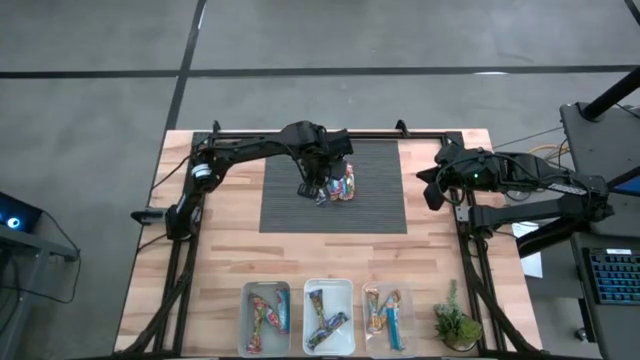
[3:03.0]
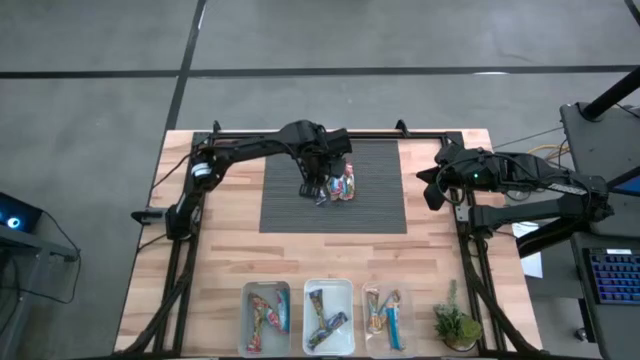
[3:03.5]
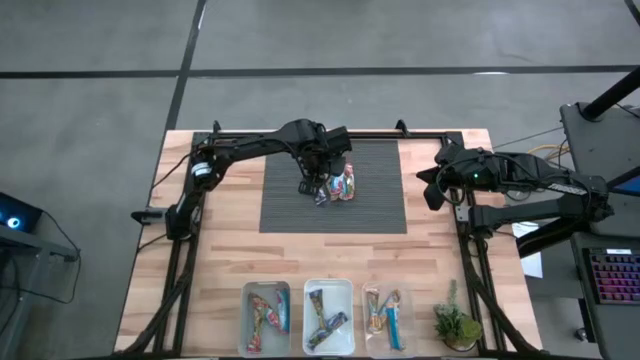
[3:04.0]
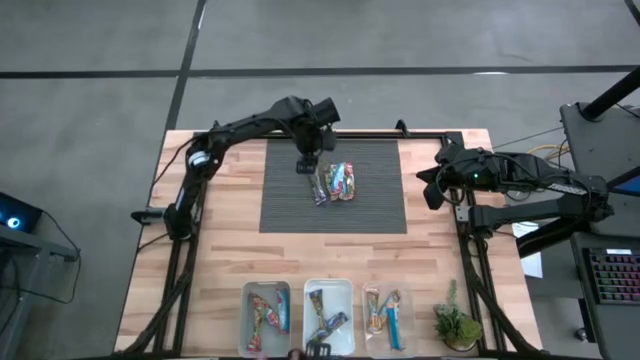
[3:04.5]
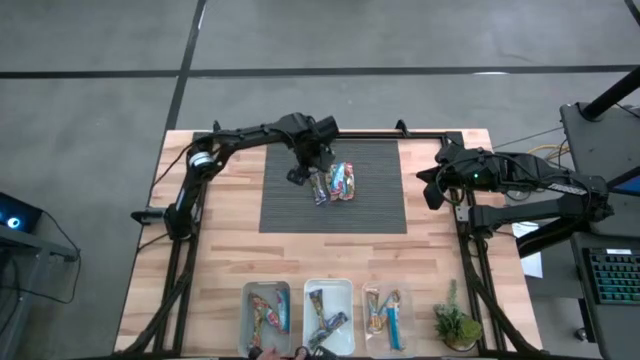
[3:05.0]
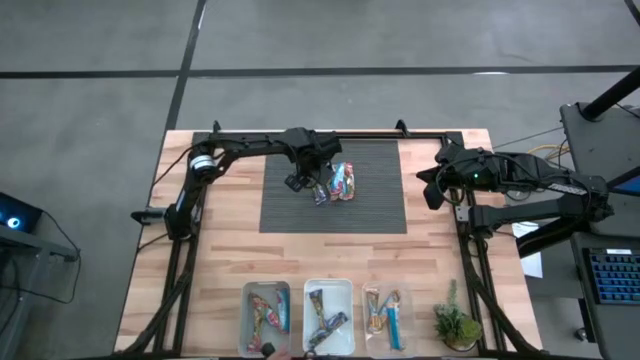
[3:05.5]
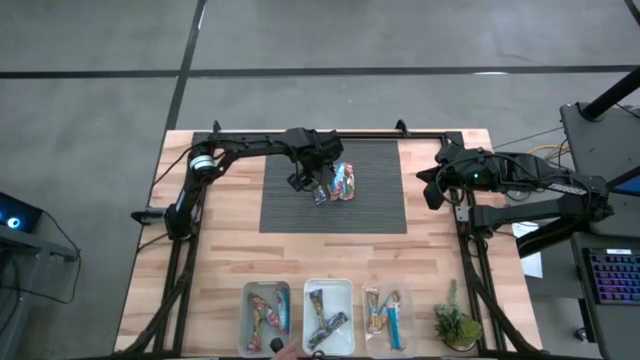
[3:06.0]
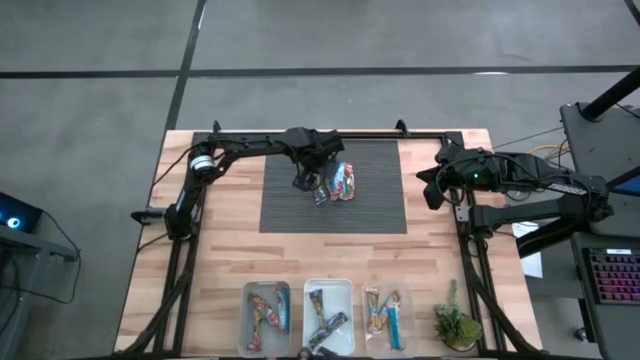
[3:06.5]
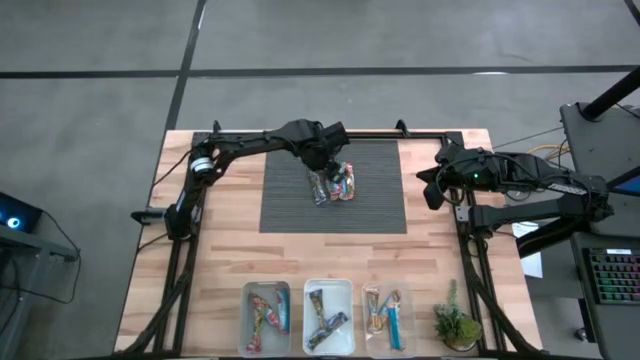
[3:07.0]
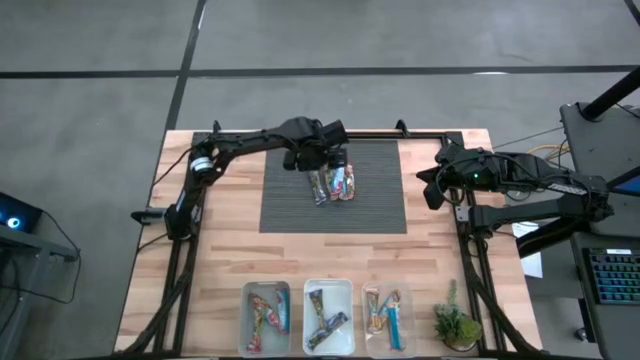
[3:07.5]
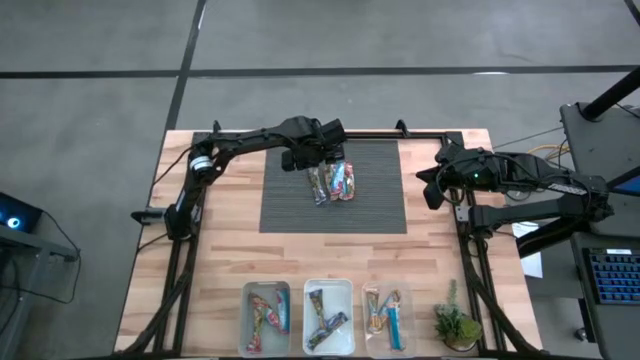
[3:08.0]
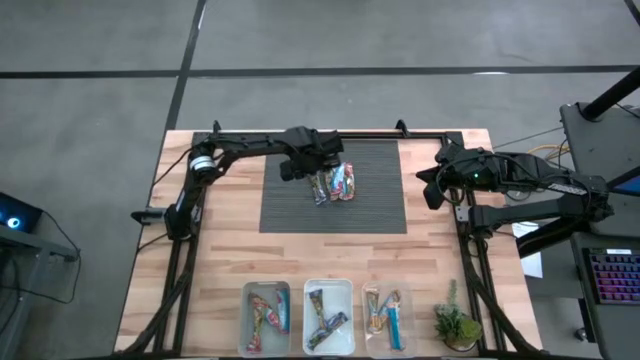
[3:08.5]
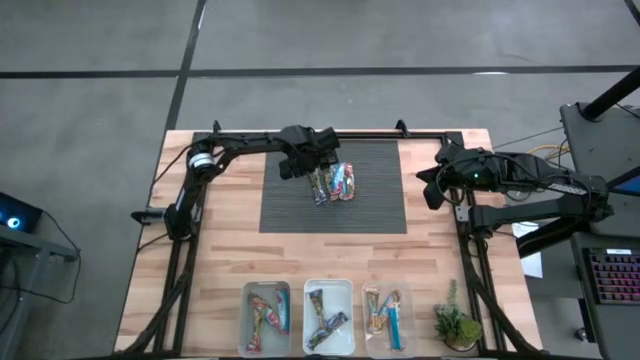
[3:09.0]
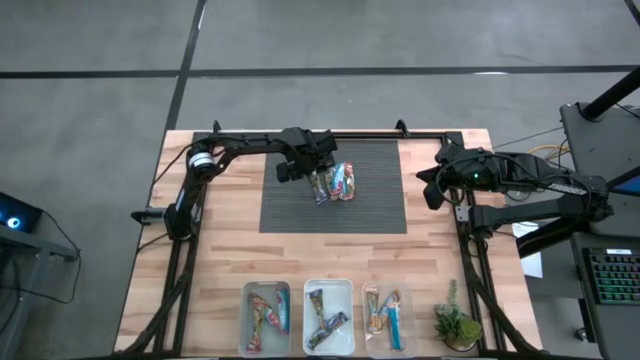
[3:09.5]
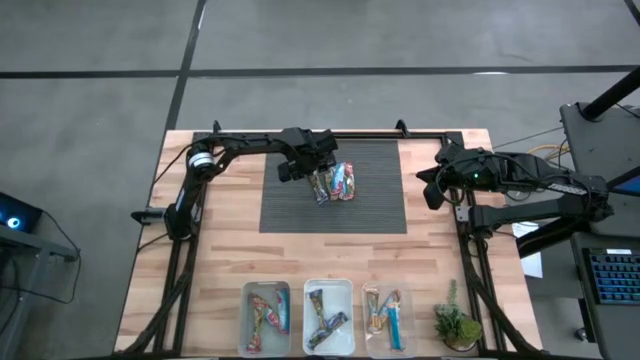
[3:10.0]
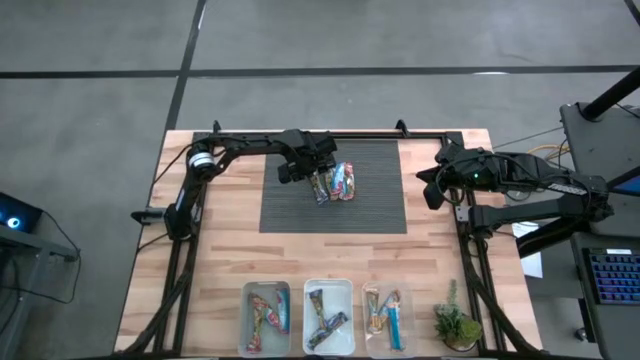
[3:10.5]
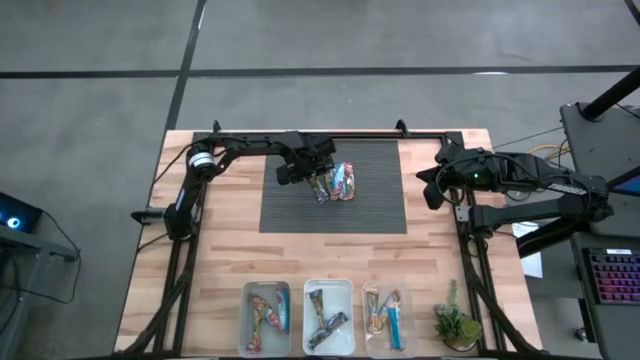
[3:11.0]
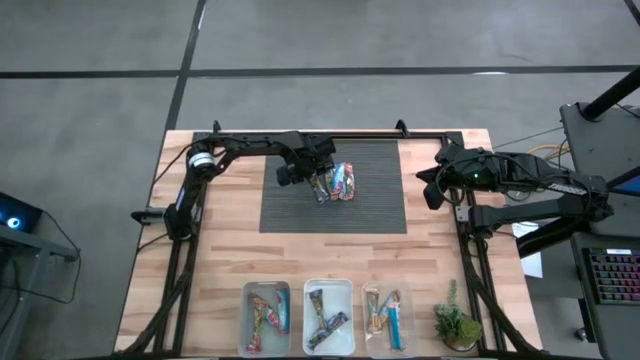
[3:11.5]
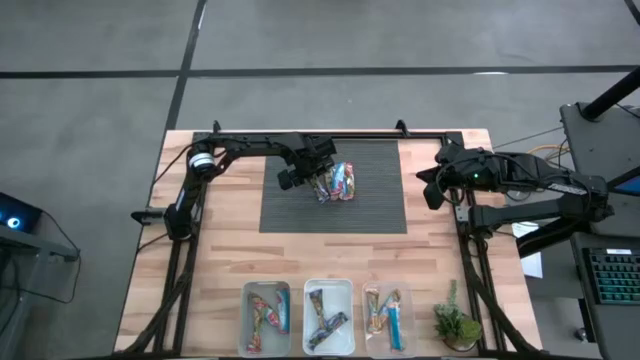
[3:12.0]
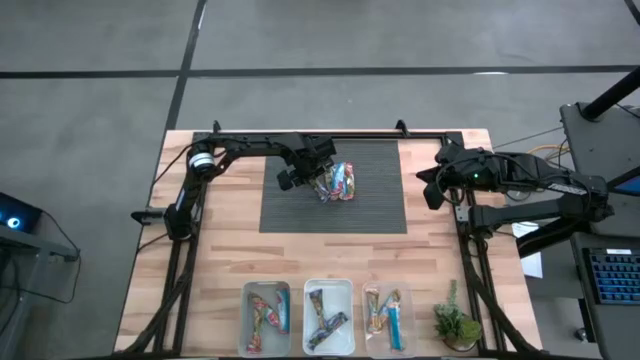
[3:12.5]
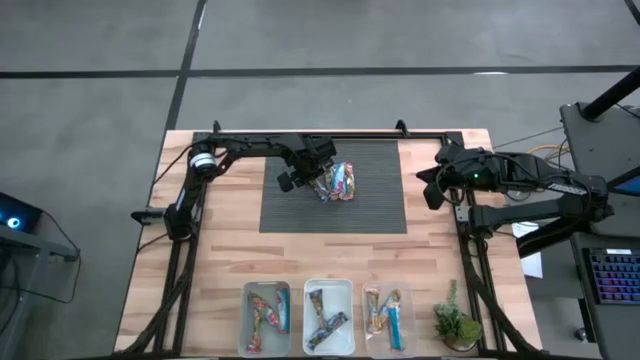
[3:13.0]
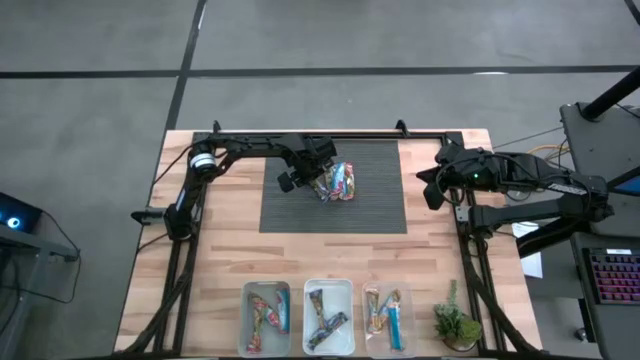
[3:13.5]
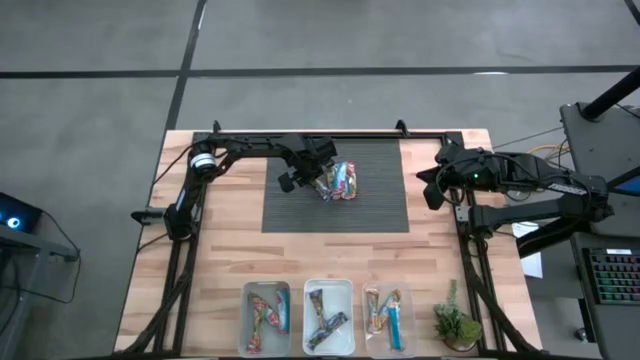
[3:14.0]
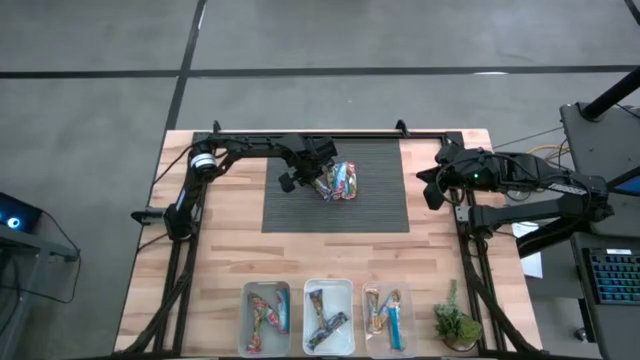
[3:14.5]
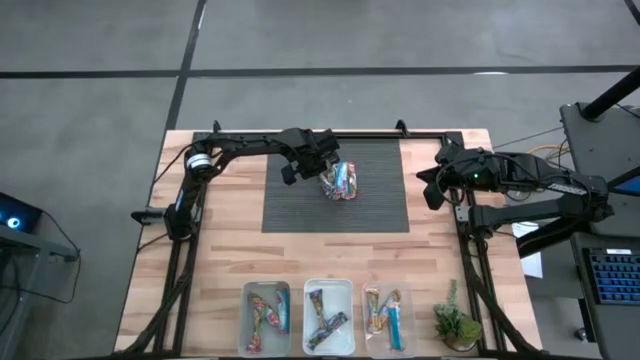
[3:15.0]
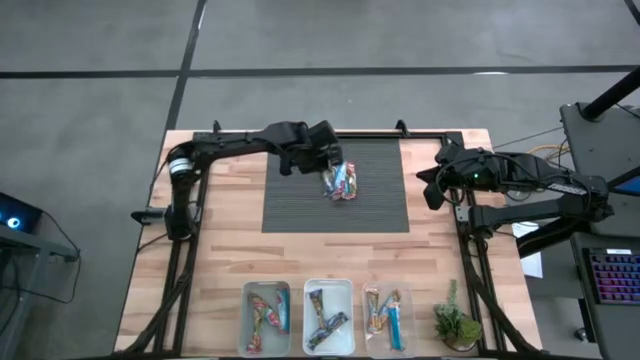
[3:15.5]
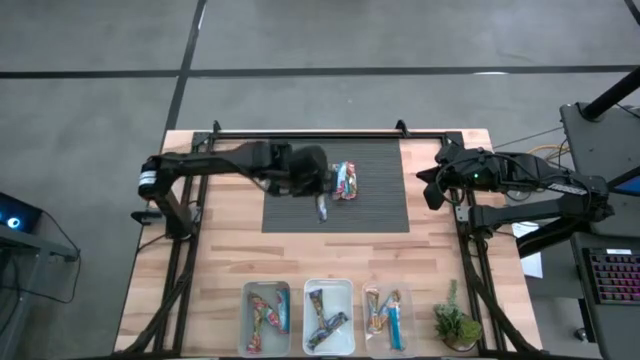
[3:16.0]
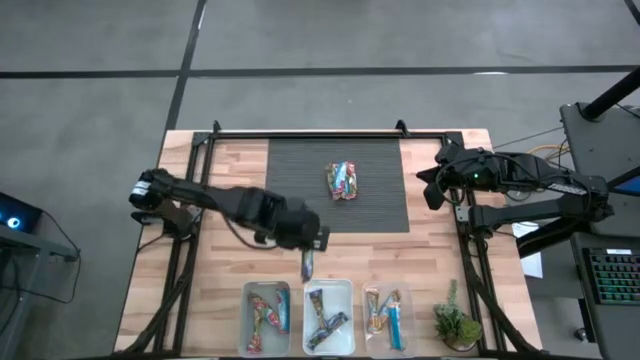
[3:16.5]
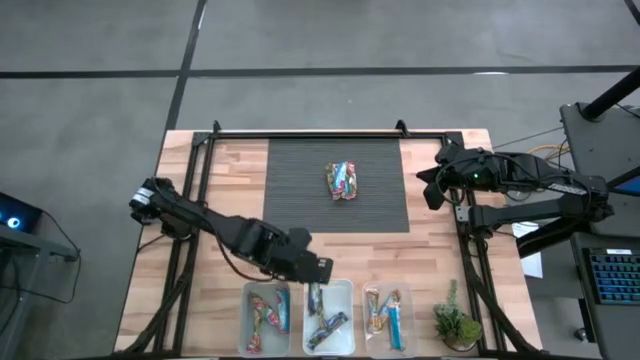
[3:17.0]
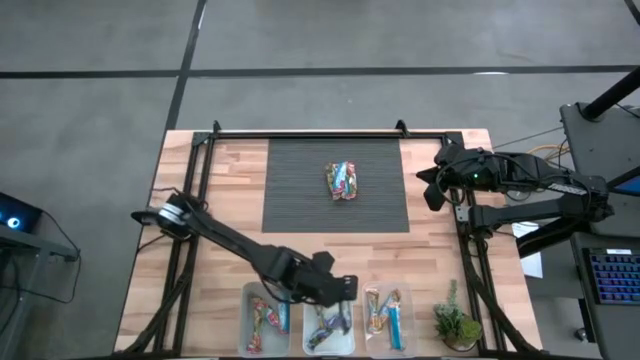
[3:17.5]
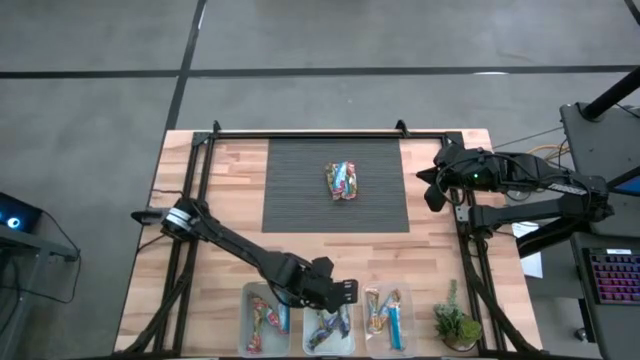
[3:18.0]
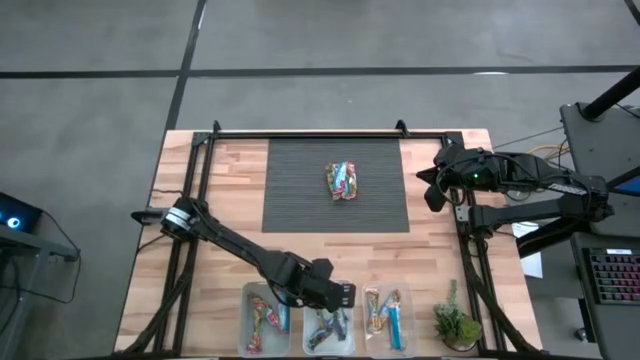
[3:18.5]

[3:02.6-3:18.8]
Task: Pick and place Granola Bars by type
Put the blue granola bar into the white bin

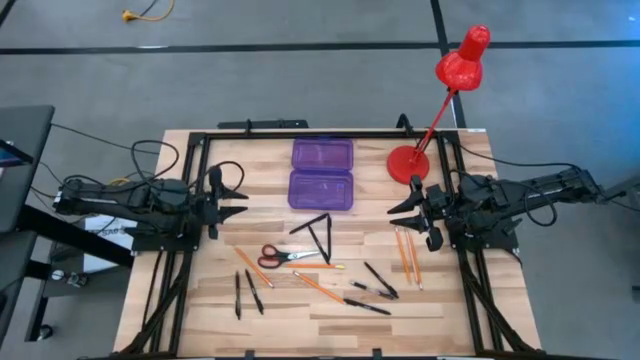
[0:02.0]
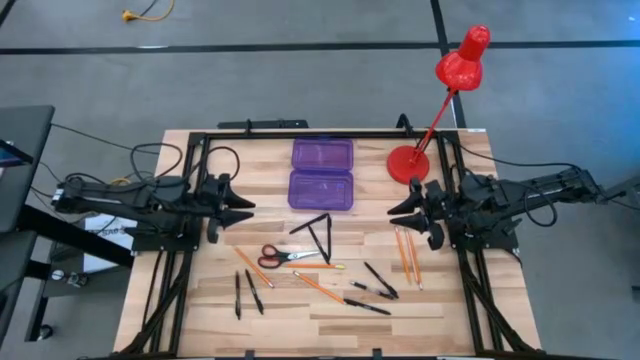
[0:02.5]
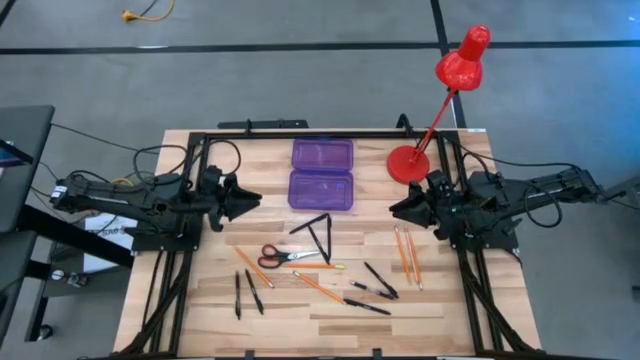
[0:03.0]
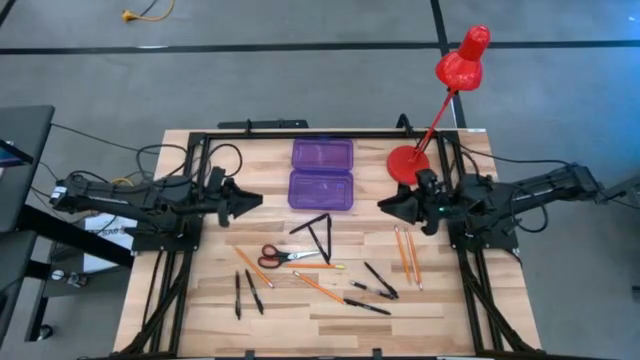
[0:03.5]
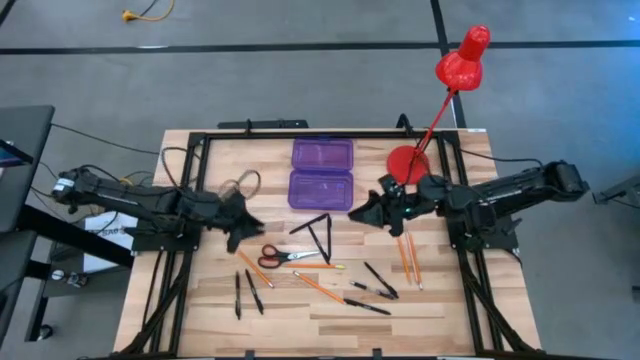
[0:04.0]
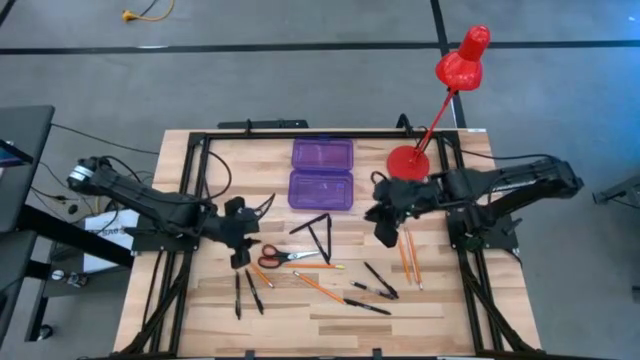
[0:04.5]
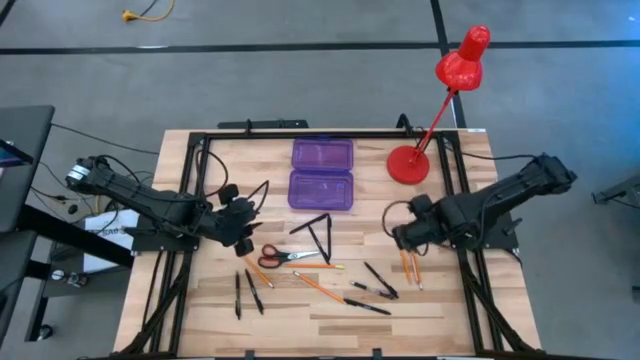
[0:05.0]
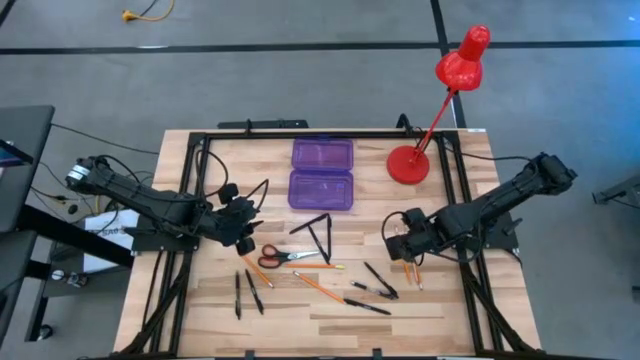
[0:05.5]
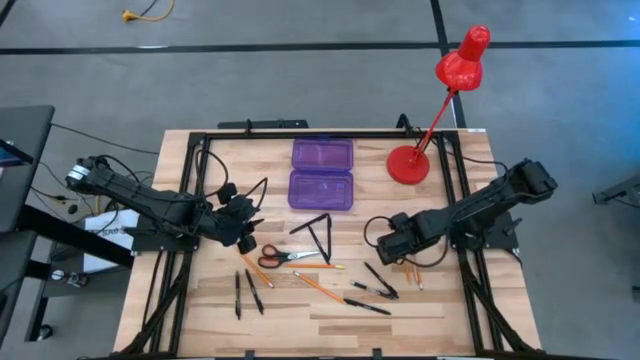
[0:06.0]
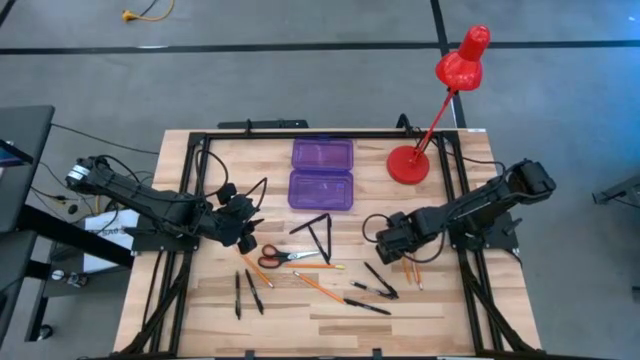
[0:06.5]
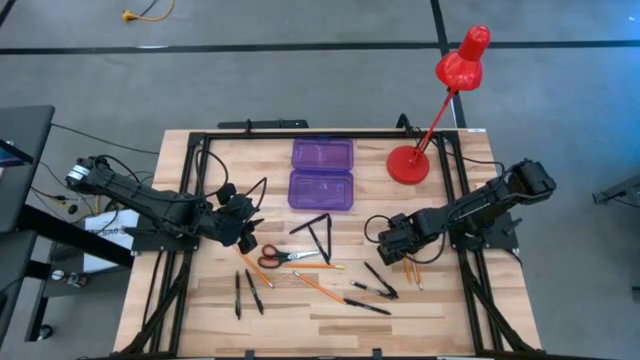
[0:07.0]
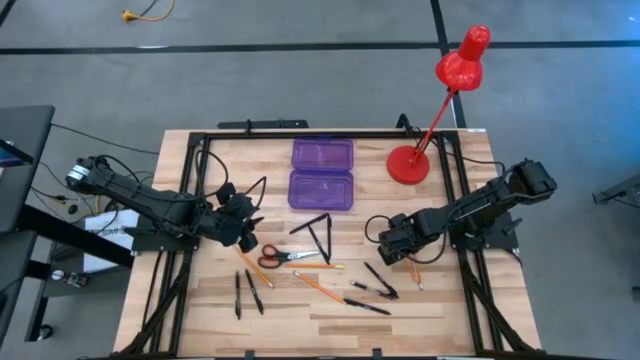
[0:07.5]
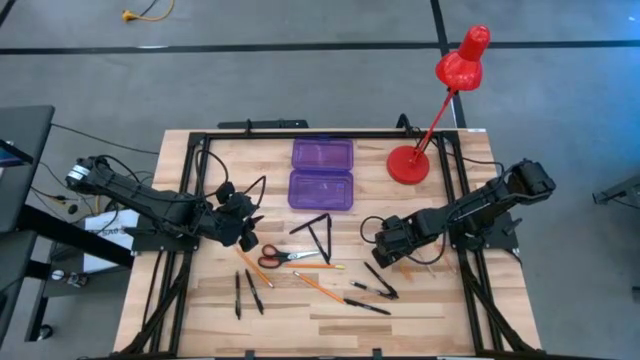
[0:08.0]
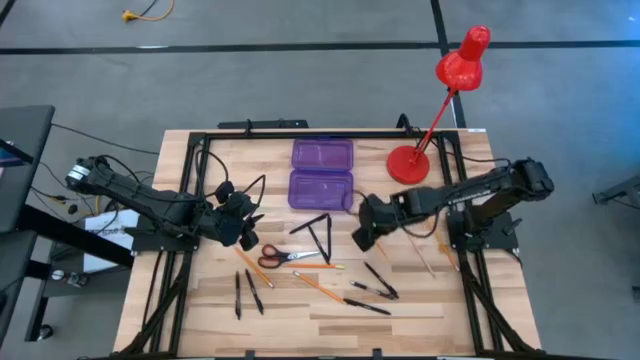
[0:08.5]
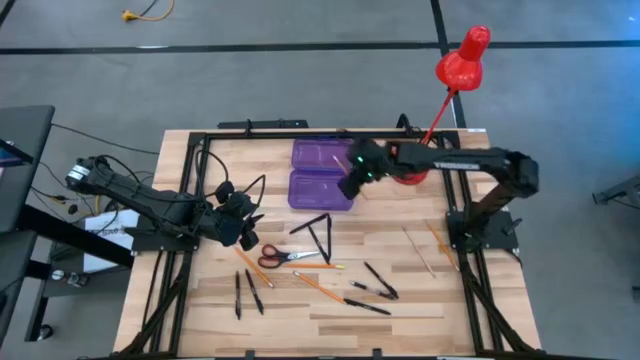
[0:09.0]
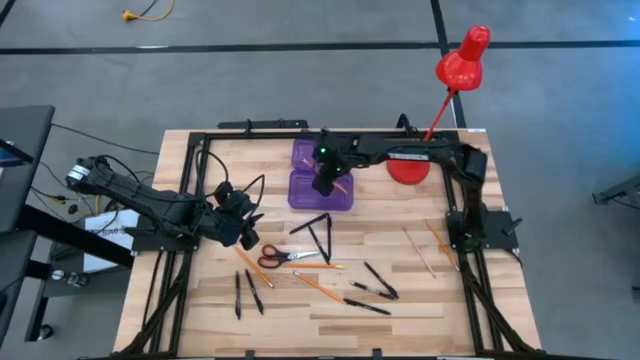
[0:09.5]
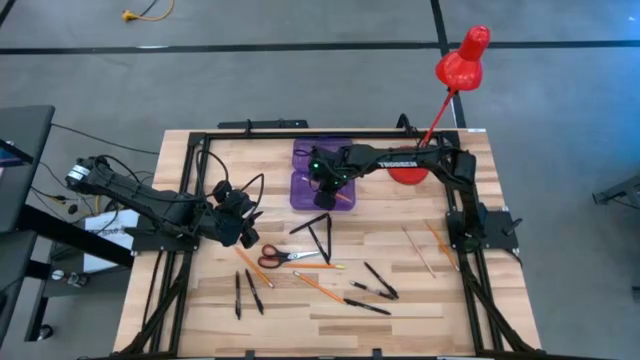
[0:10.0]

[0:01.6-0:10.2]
Task: Pick & place school supplies into a supply box
Put the yellow pencil into the purple supply box
